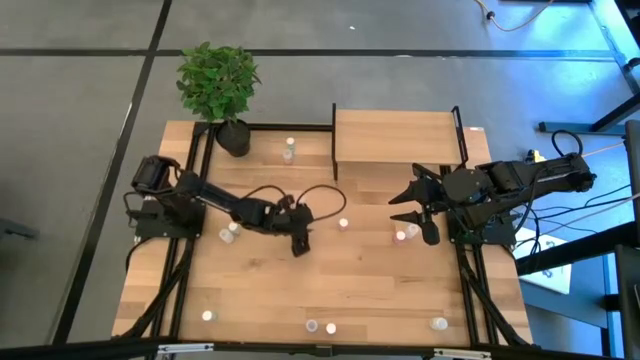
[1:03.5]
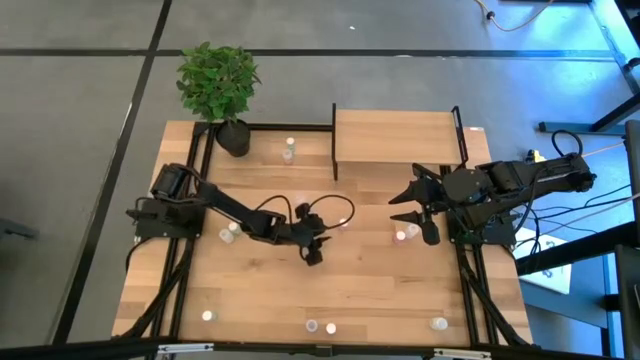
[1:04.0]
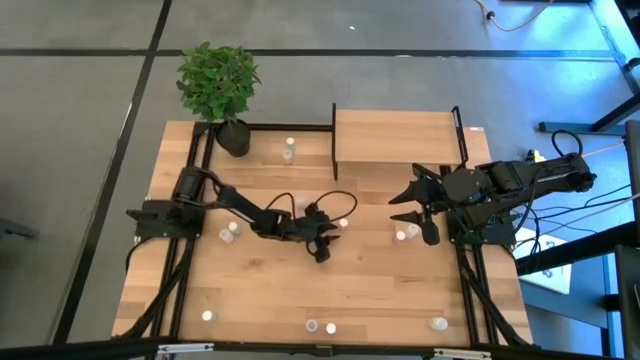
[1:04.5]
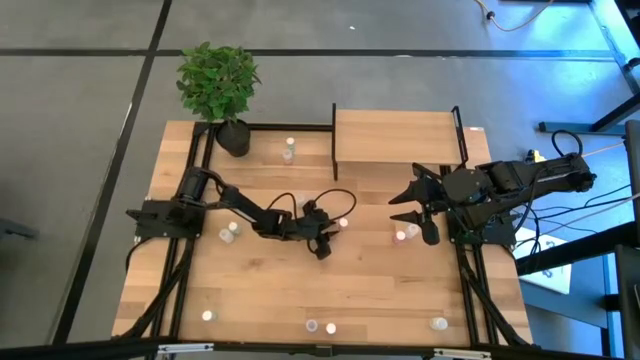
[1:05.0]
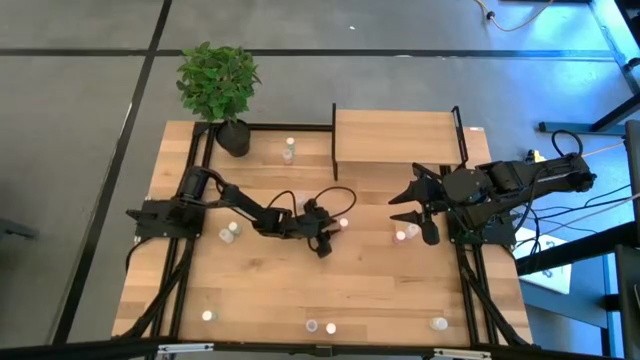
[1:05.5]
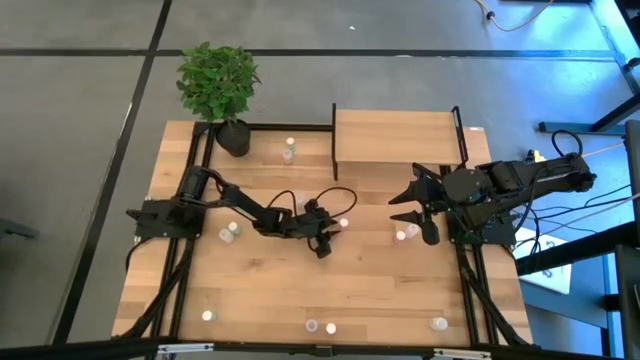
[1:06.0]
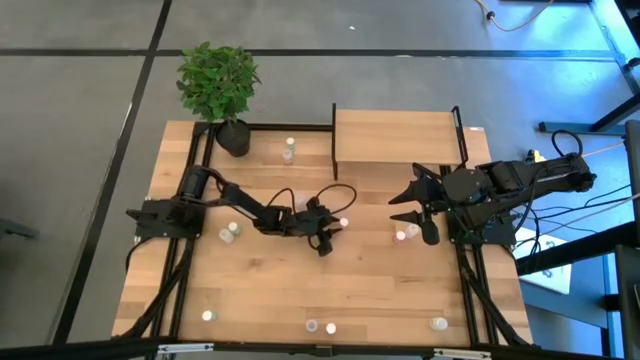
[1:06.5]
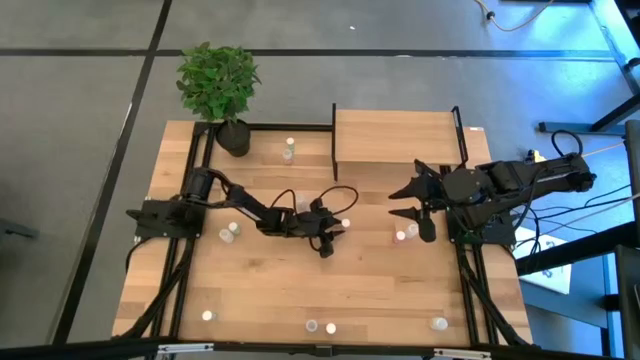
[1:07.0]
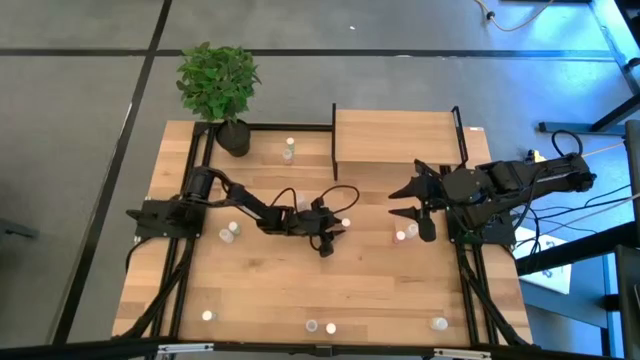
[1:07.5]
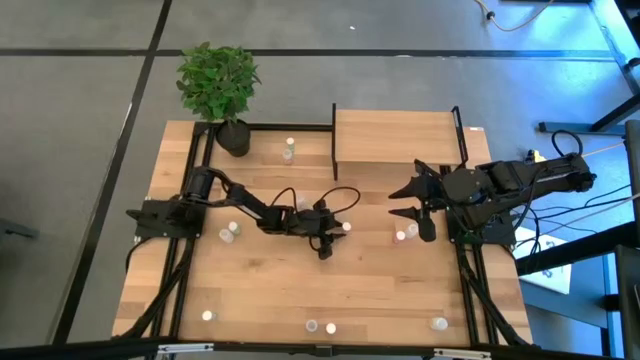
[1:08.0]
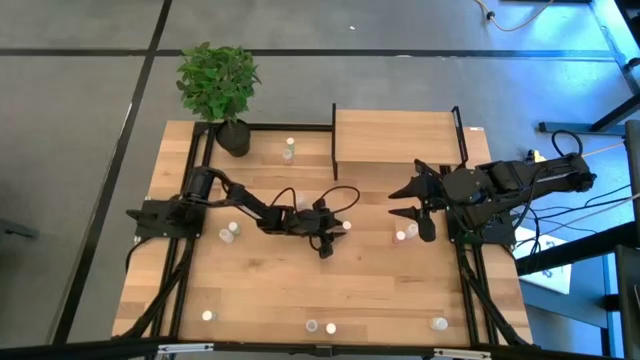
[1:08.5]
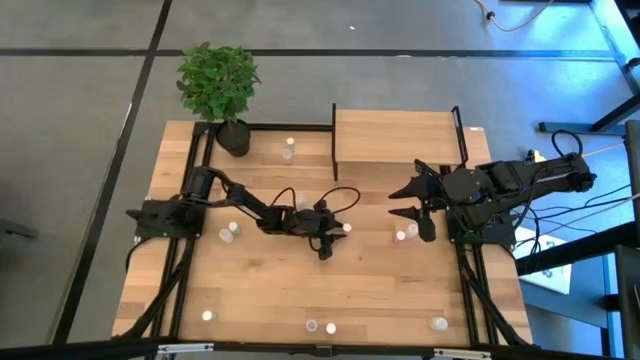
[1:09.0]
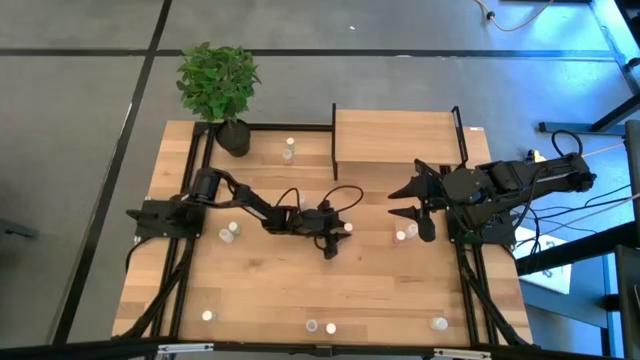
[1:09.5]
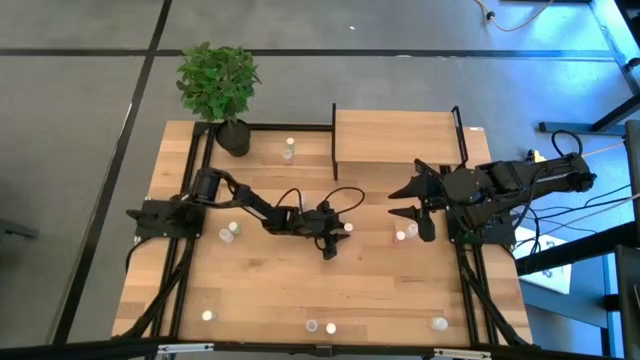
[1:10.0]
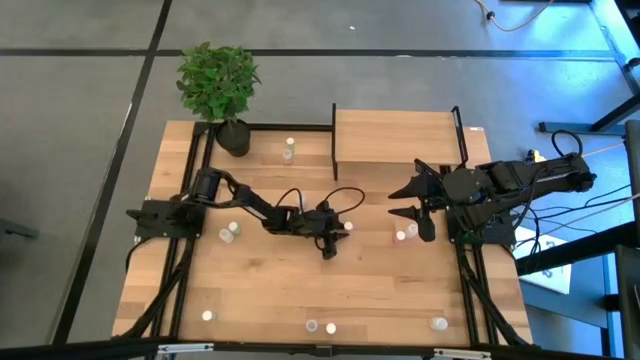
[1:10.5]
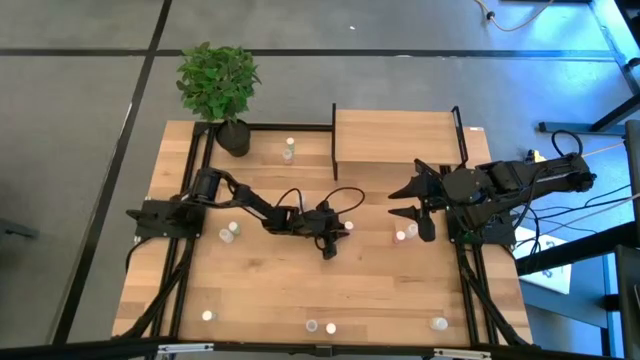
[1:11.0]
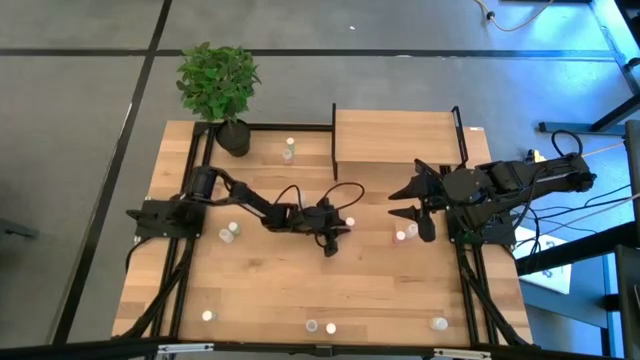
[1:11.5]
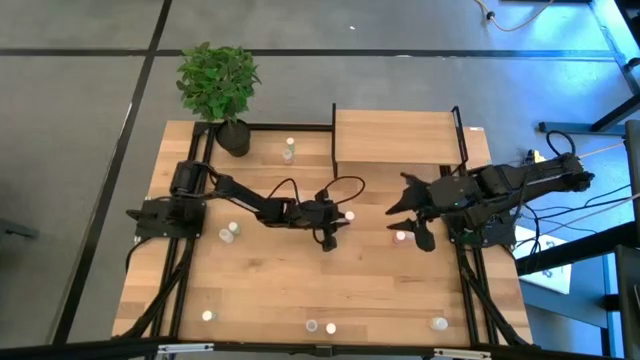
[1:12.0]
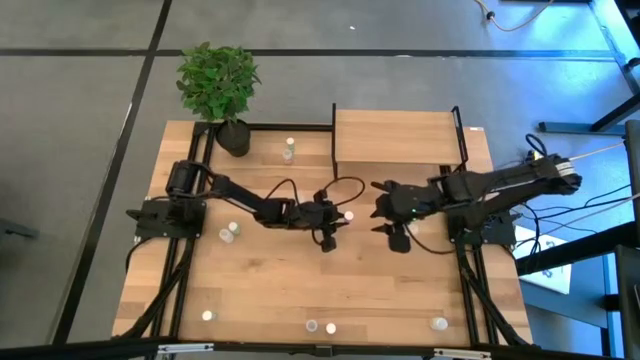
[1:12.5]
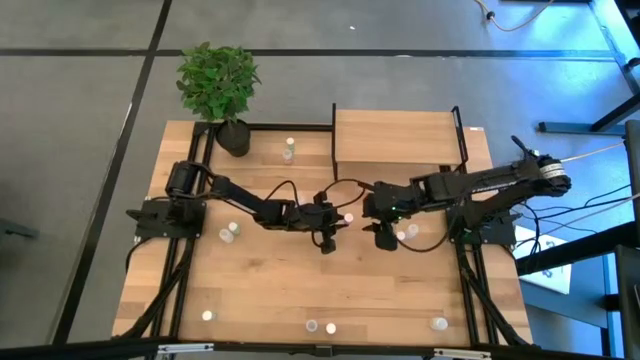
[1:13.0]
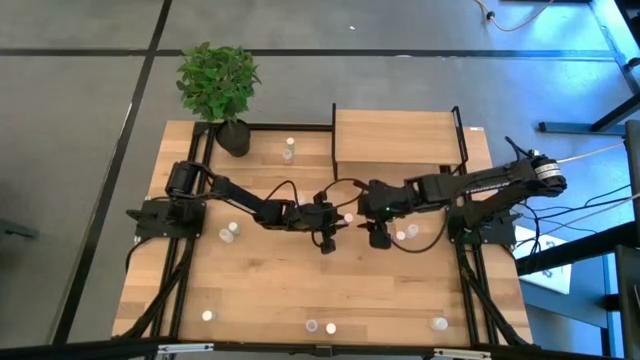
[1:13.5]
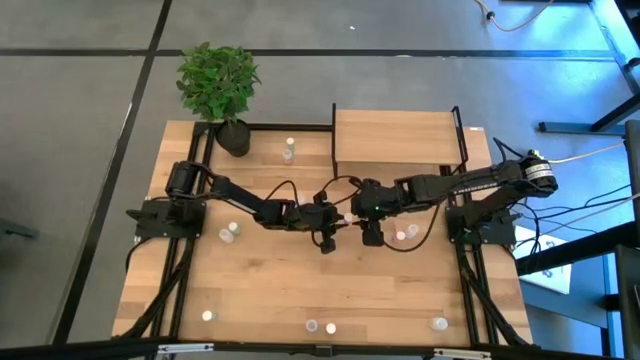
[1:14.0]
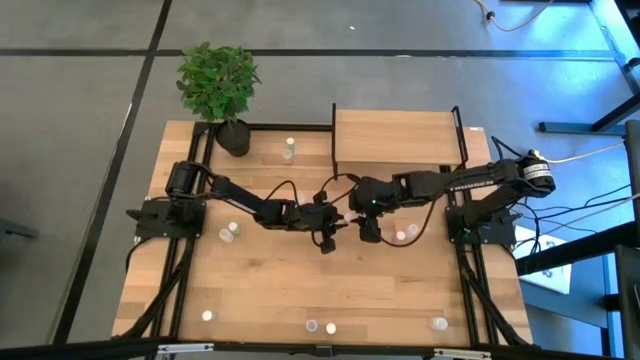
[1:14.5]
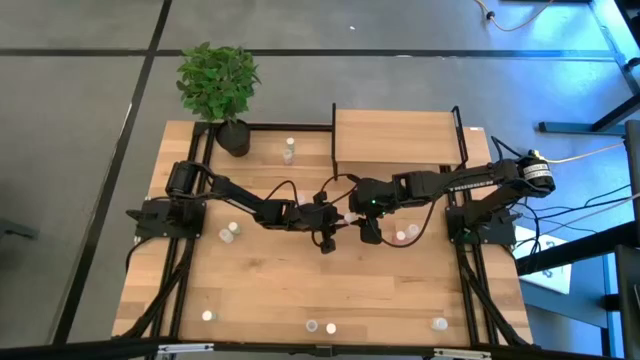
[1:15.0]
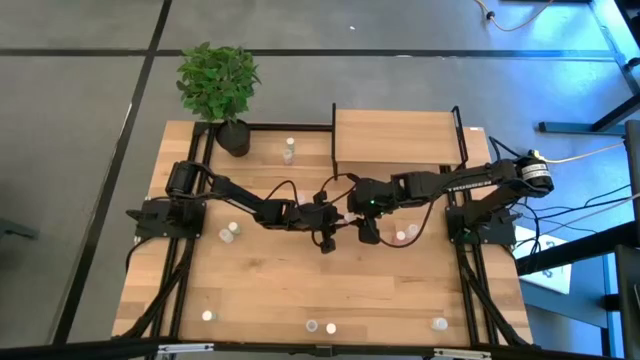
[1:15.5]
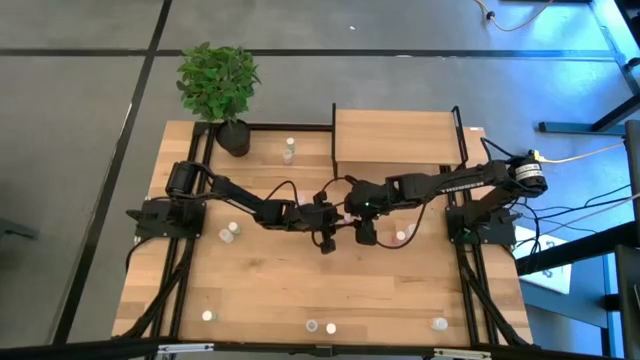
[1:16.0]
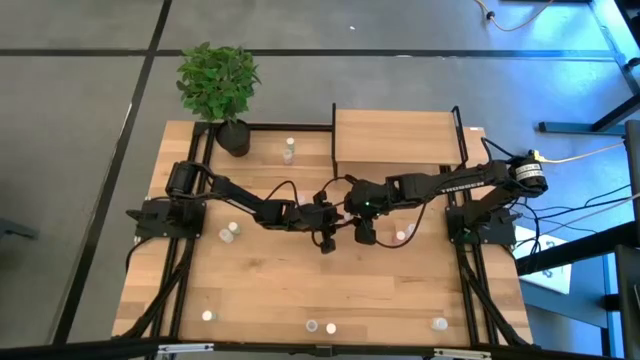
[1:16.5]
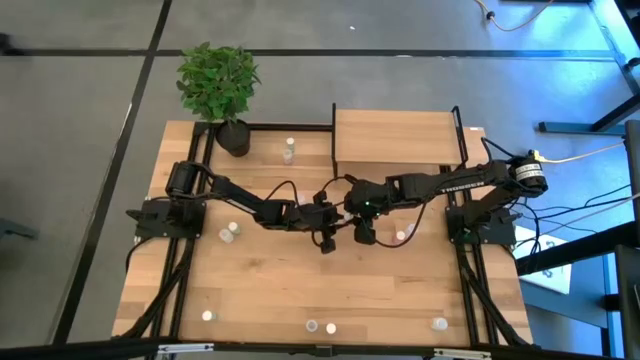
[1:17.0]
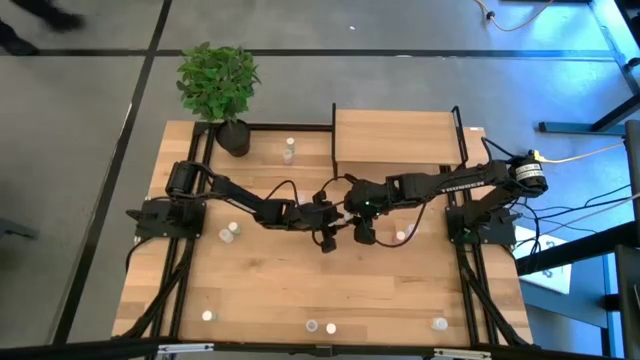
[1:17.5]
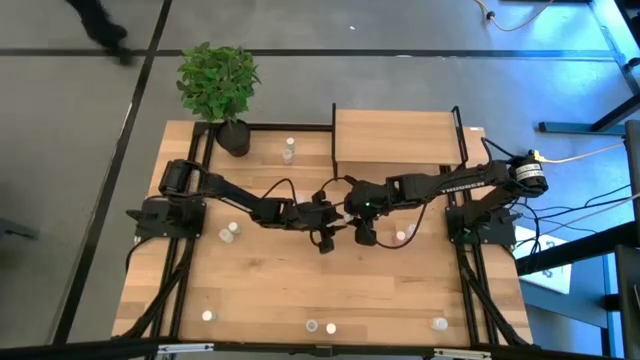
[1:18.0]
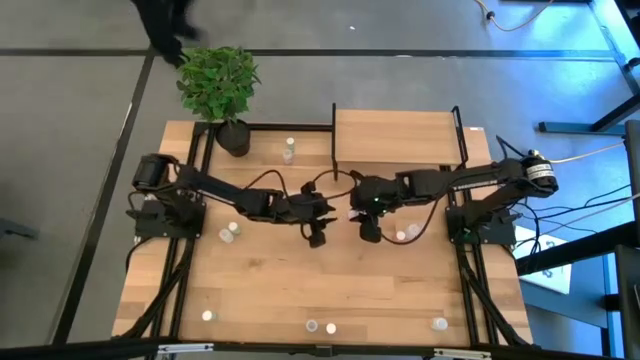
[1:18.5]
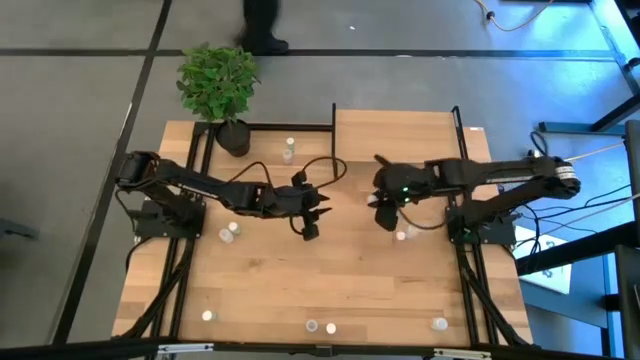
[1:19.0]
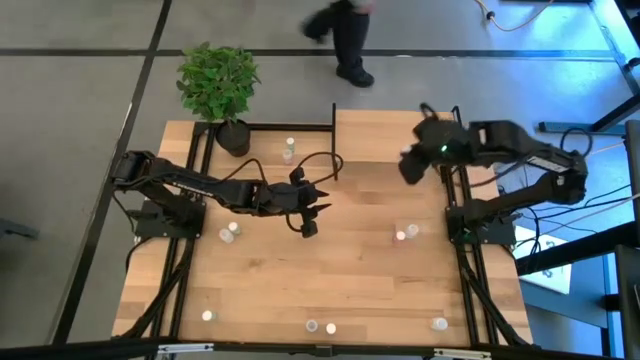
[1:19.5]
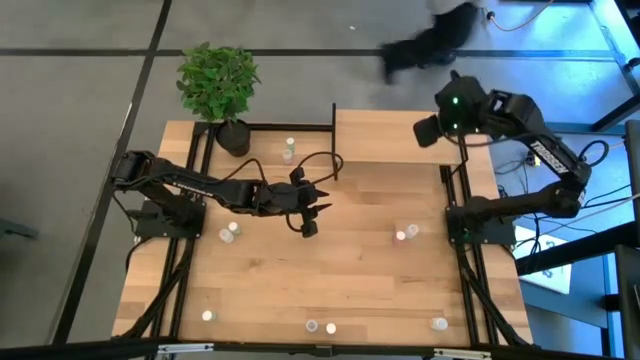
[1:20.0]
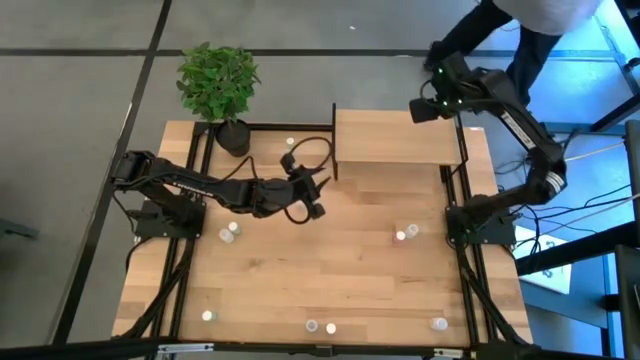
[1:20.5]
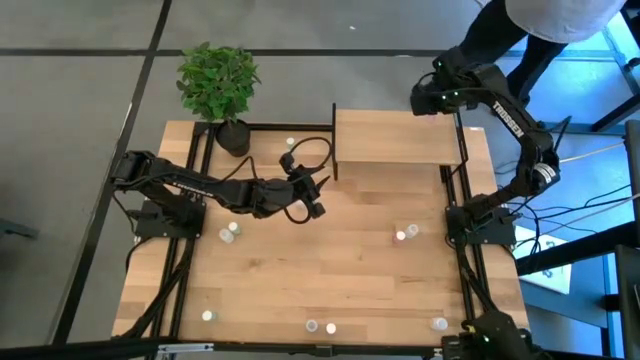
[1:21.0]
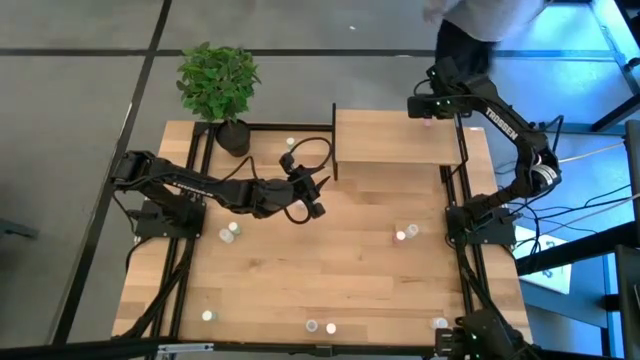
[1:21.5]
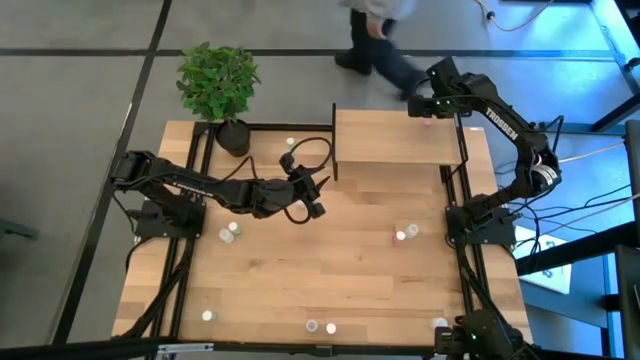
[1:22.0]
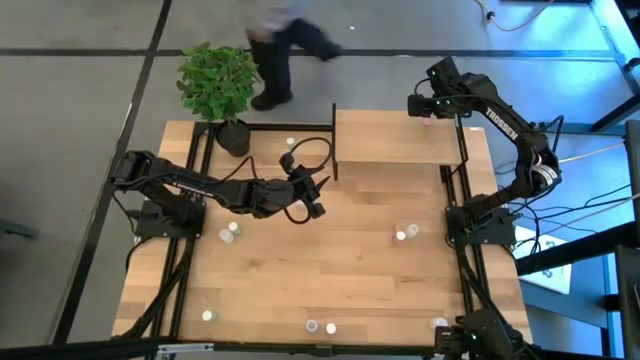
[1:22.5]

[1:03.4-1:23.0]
Task: Pick and place medicine bottles onto shelf by color
Put the top left pink pill bottle on the shelf
